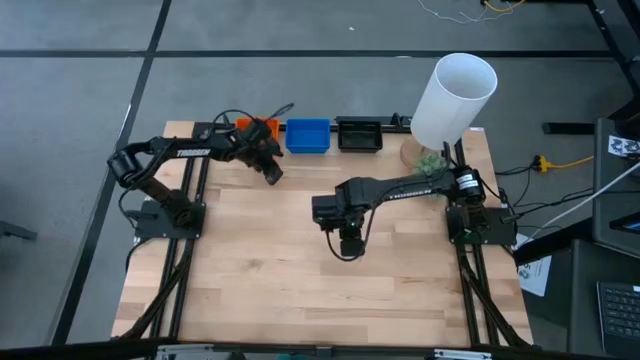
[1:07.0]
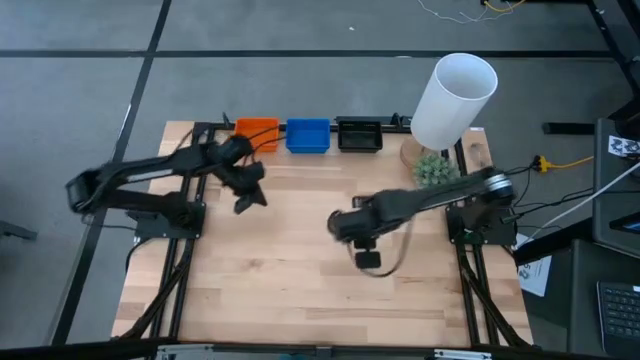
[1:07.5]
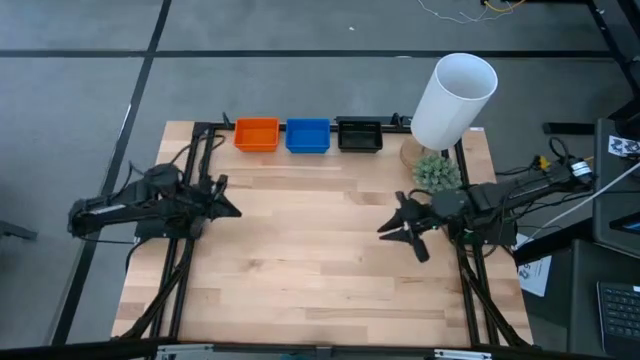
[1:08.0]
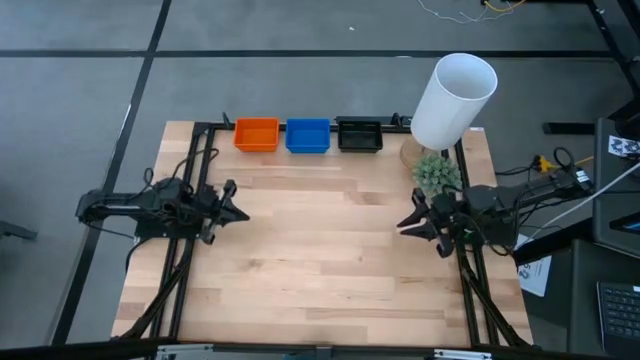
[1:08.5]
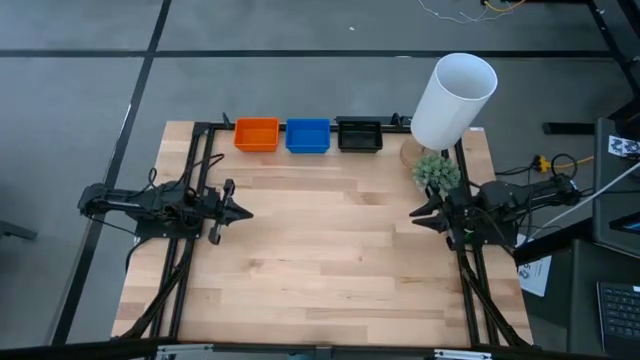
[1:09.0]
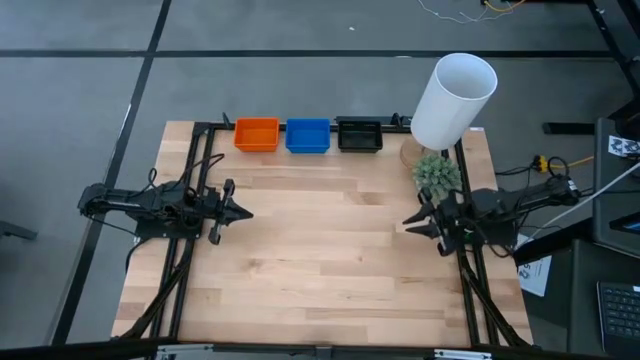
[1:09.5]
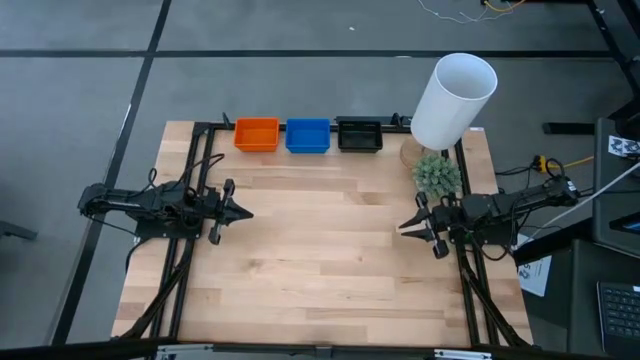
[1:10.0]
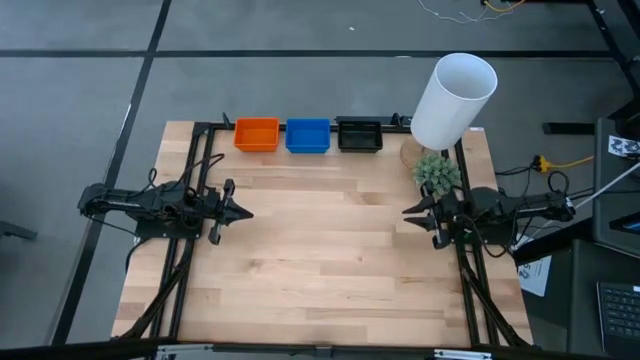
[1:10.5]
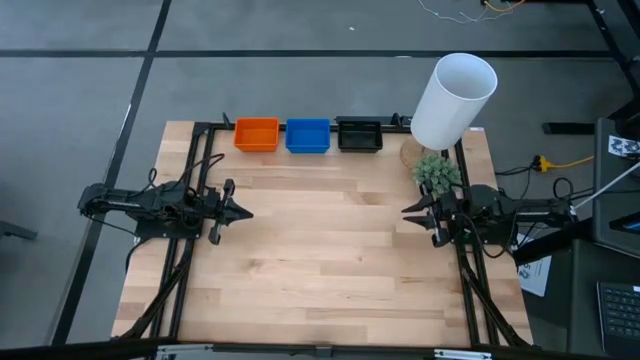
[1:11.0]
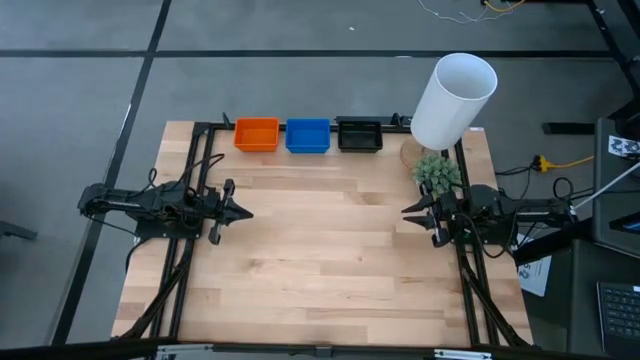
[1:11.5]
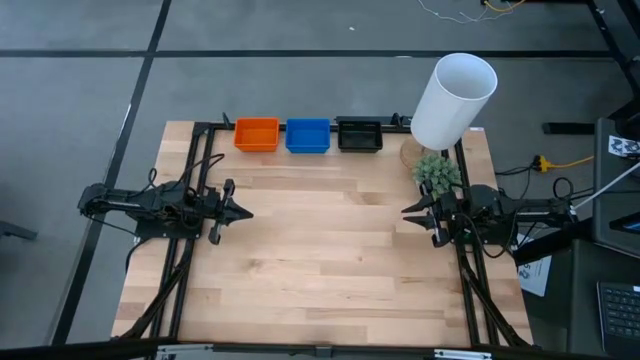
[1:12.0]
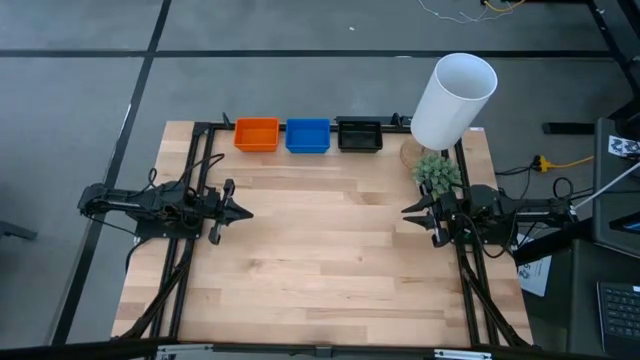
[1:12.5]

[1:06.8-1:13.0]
Return to Home Position

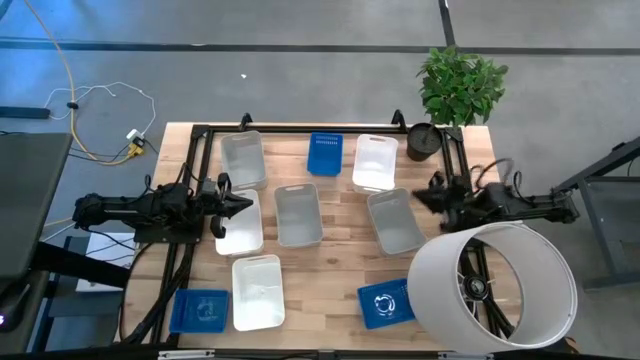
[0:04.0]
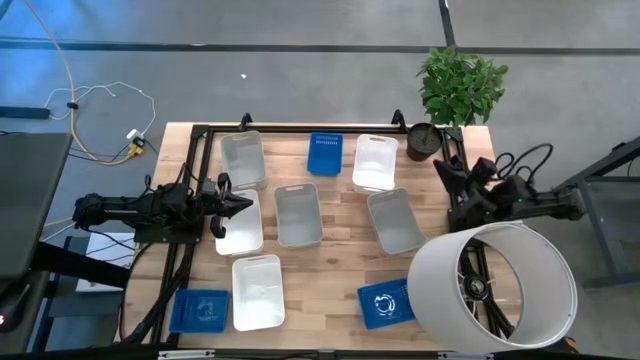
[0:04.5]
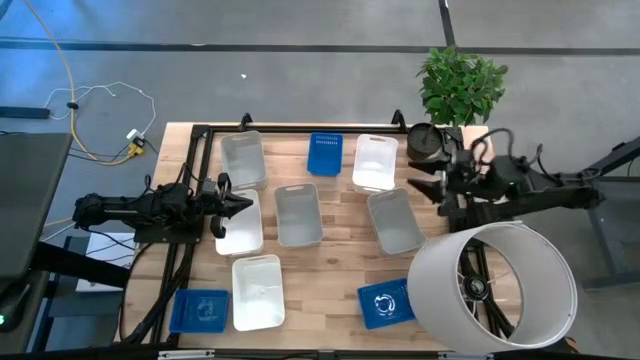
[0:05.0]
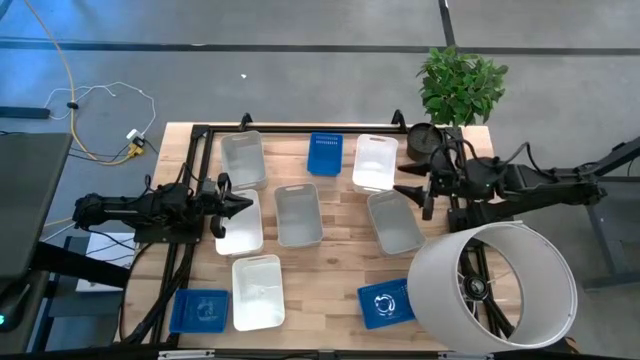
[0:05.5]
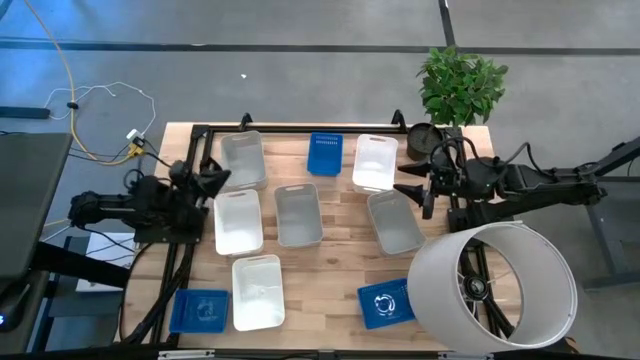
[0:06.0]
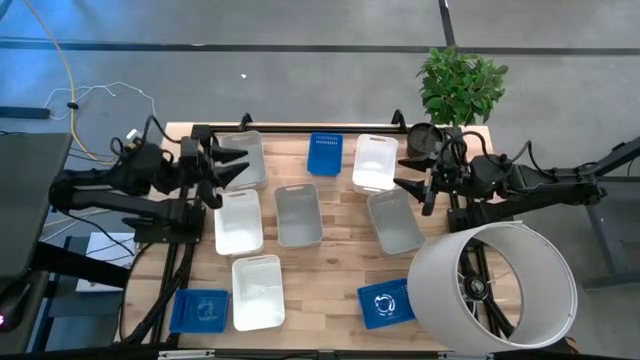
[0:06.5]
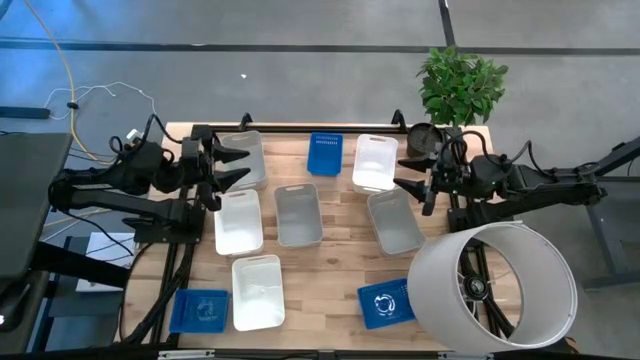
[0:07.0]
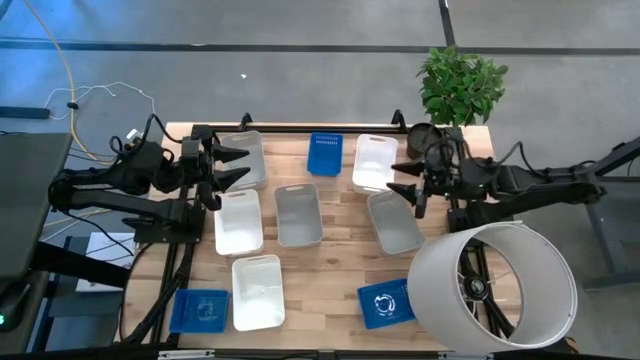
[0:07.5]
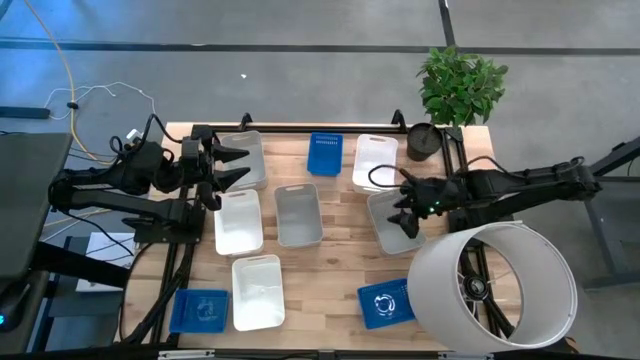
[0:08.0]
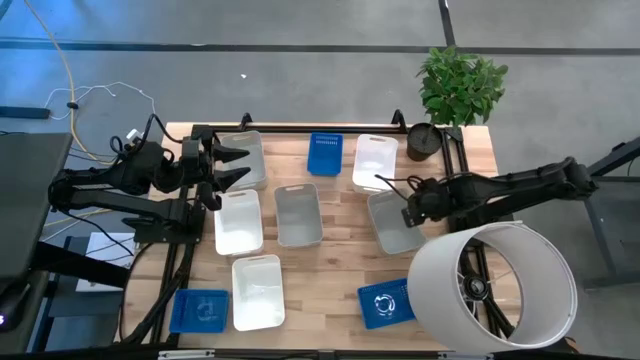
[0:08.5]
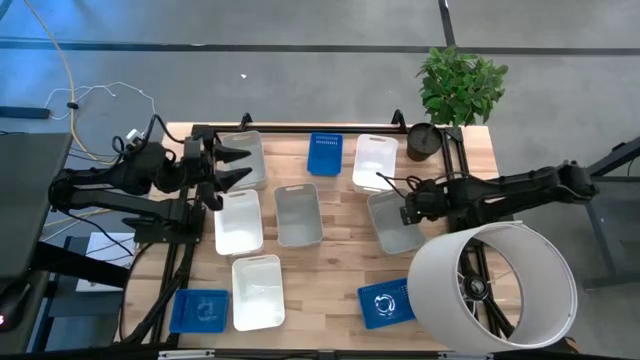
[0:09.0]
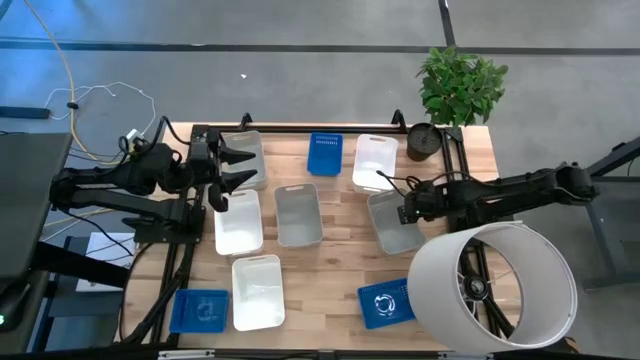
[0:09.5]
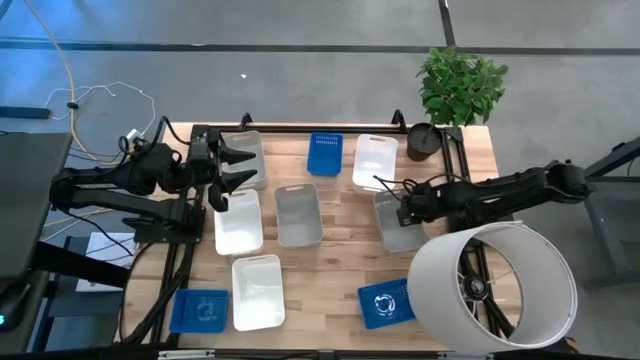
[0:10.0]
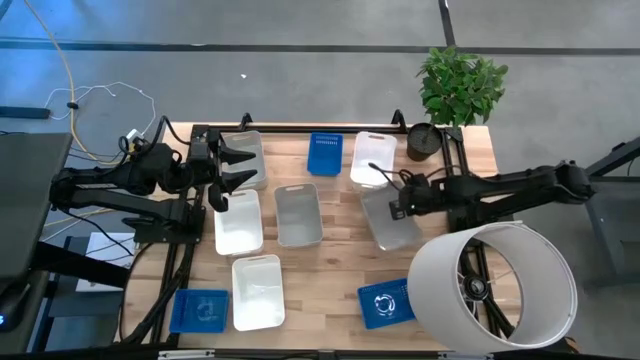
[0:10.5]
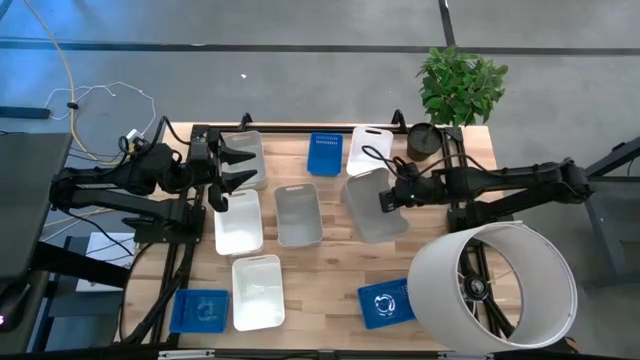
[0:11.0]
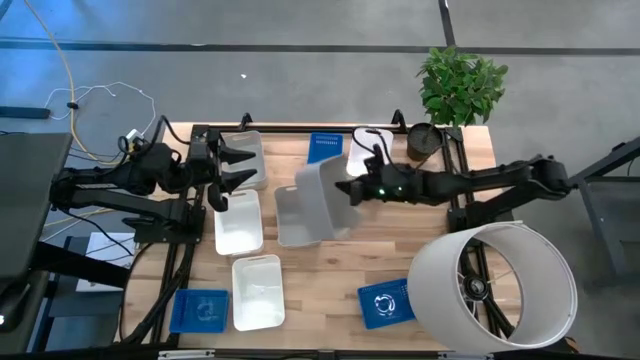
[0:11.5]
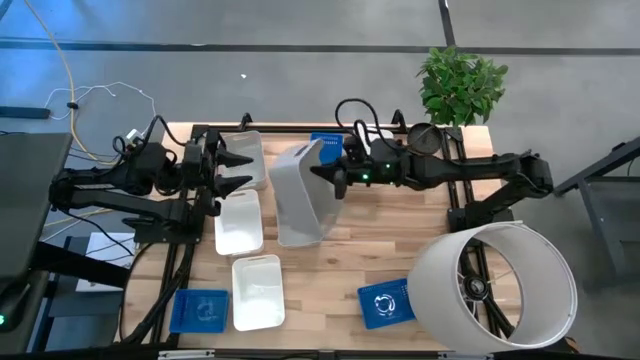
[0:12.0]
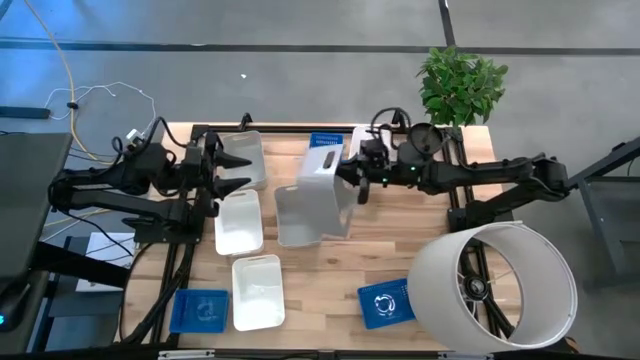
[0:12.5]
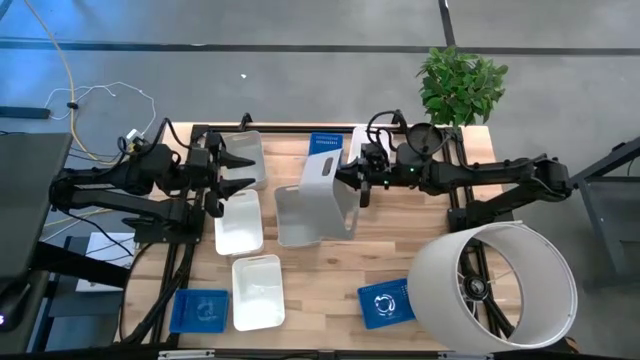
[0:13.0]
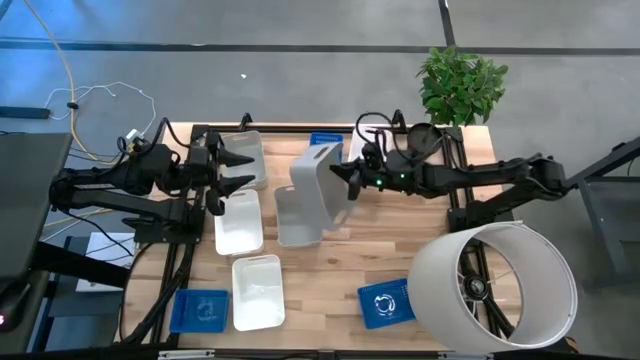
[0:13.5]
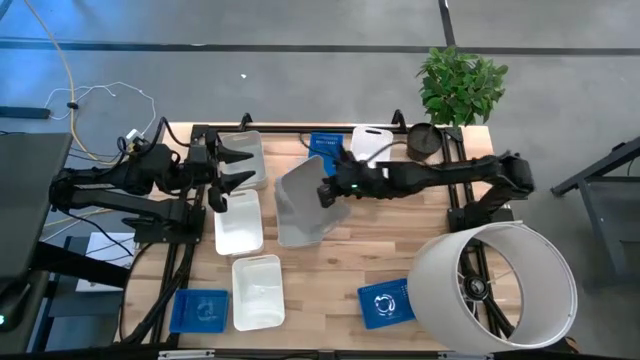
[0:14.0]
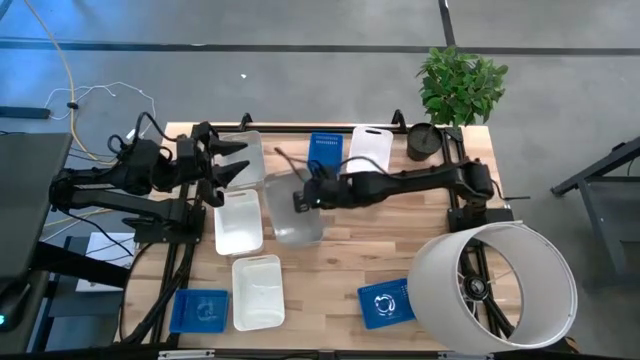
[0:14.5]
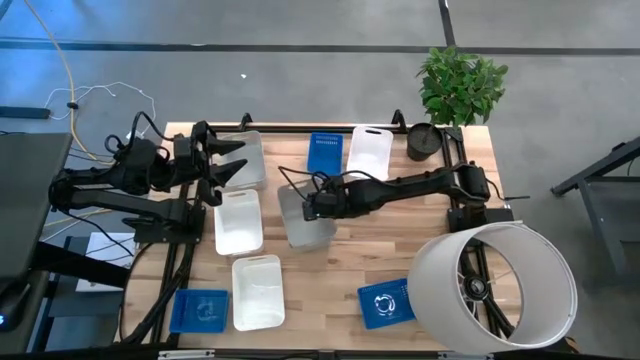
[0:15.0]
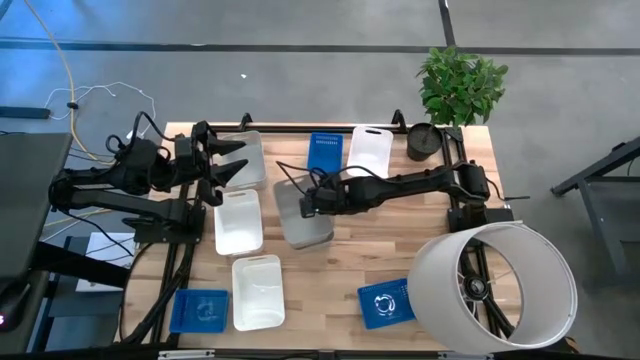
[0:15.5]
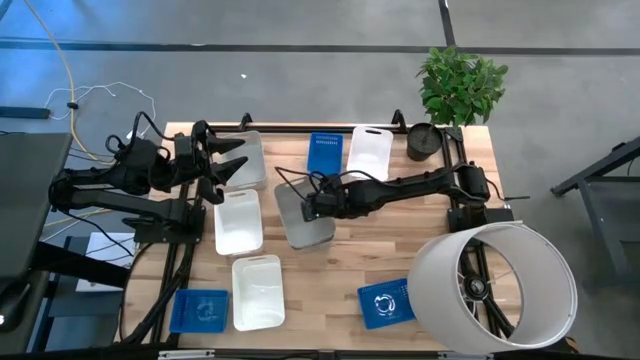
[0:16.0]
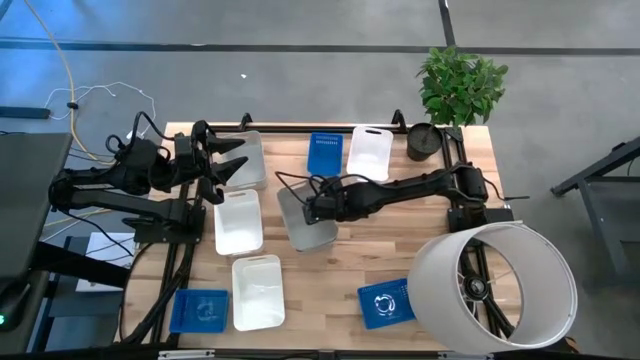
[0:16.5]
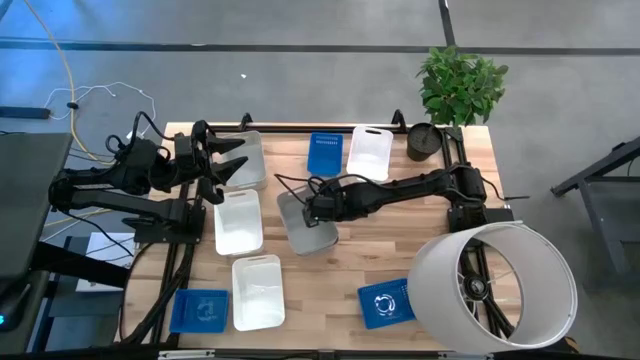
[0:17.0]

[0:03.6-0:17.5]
Stack the right gray bin on top of the middle gray bin
